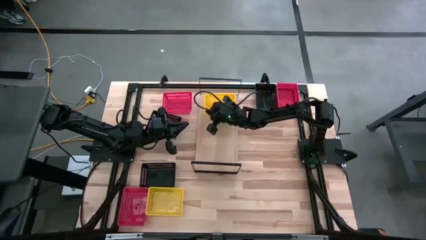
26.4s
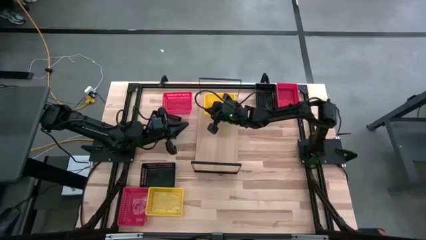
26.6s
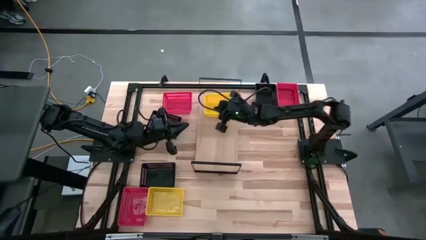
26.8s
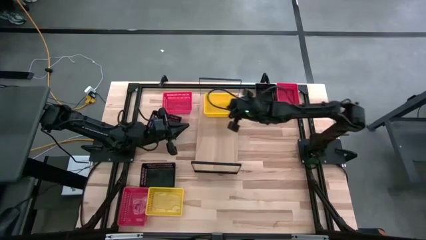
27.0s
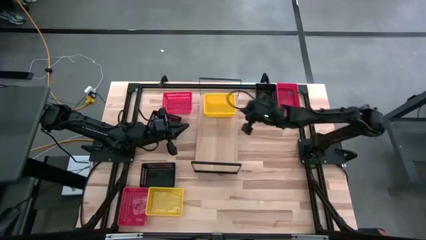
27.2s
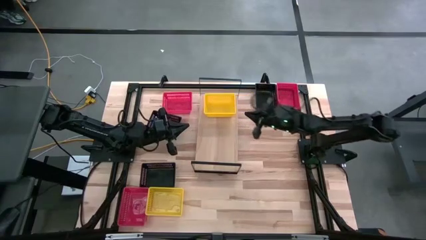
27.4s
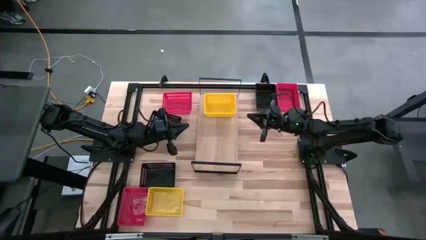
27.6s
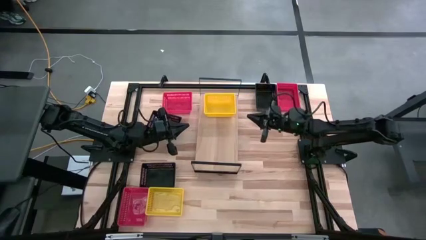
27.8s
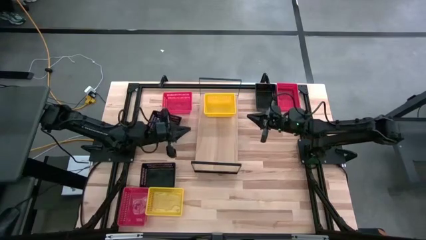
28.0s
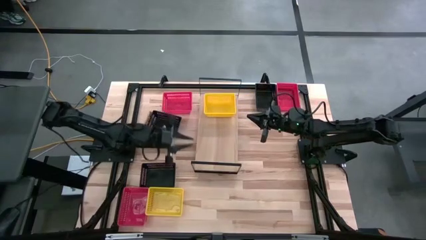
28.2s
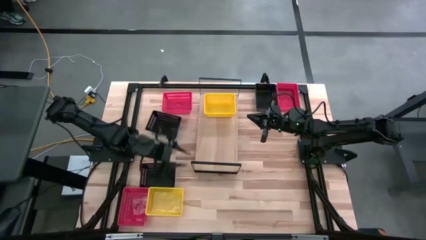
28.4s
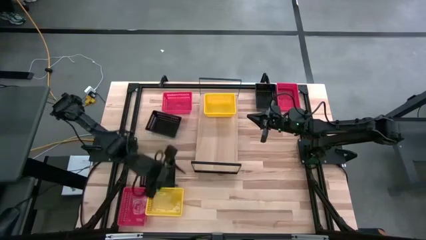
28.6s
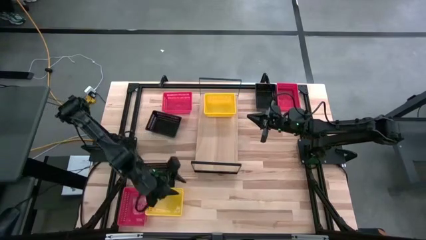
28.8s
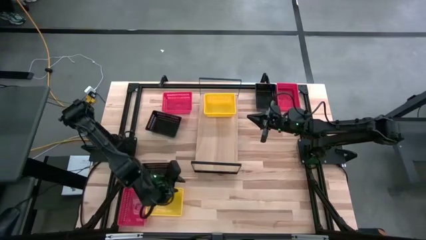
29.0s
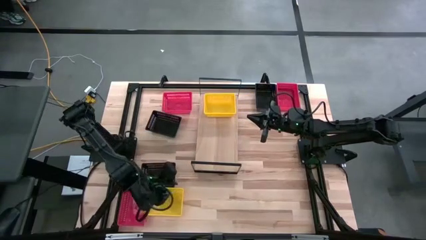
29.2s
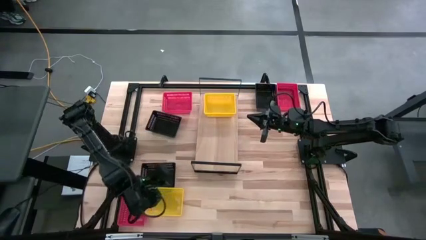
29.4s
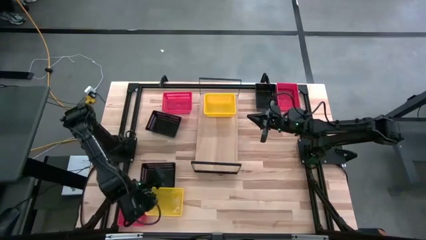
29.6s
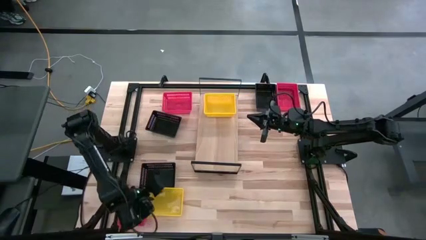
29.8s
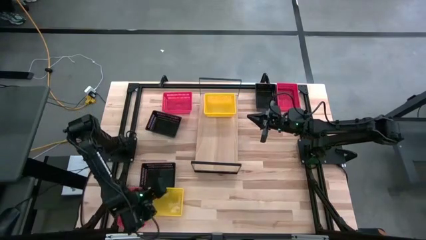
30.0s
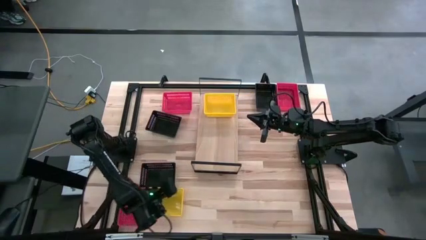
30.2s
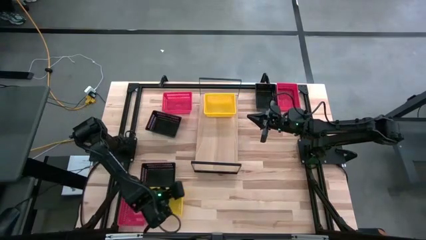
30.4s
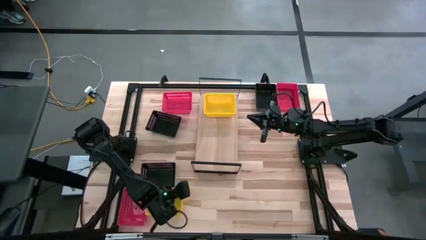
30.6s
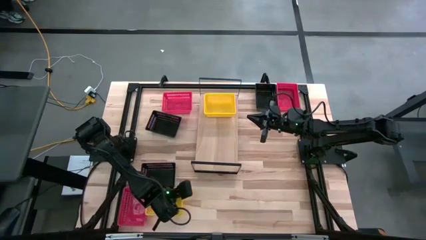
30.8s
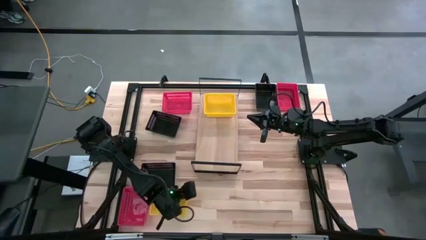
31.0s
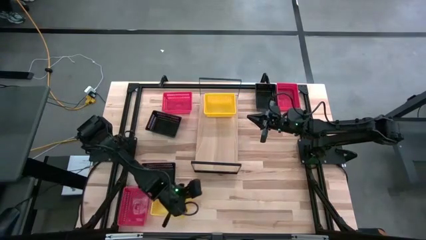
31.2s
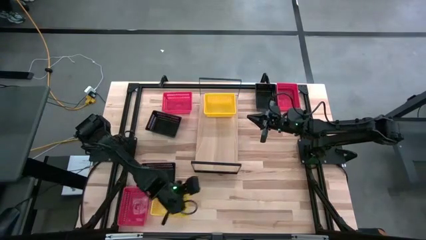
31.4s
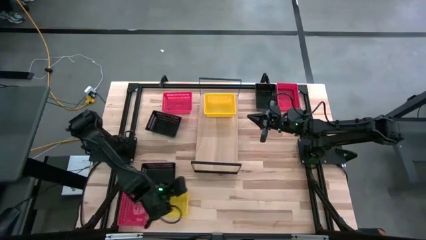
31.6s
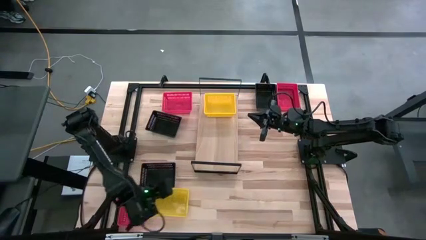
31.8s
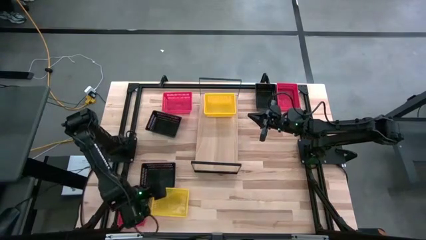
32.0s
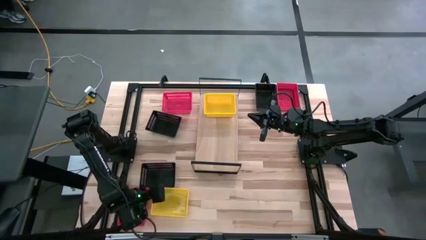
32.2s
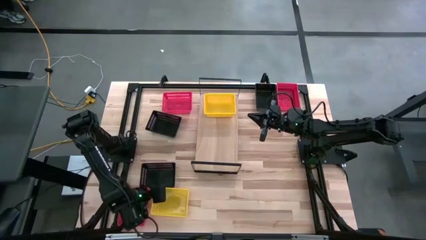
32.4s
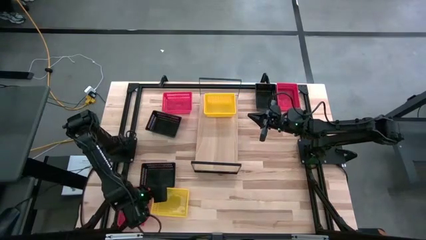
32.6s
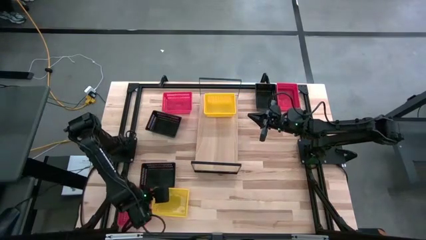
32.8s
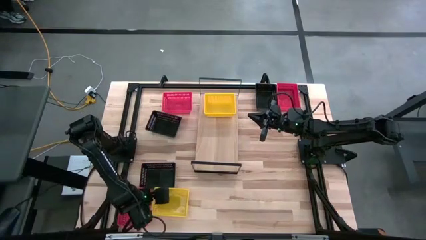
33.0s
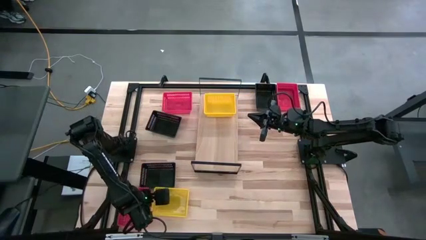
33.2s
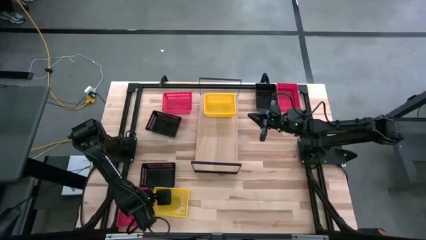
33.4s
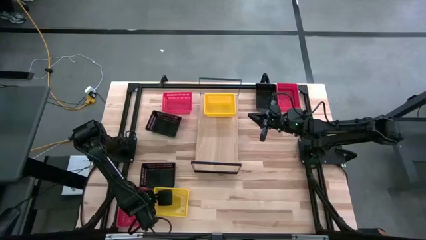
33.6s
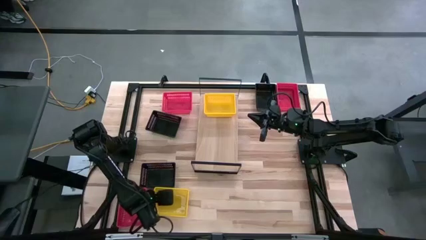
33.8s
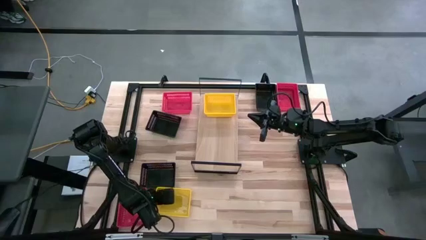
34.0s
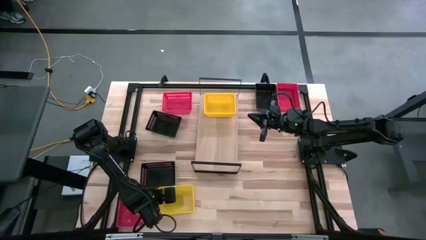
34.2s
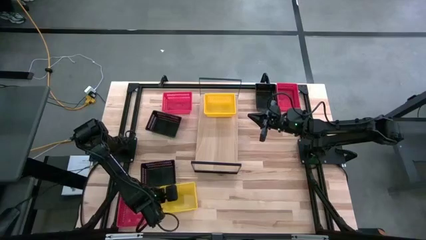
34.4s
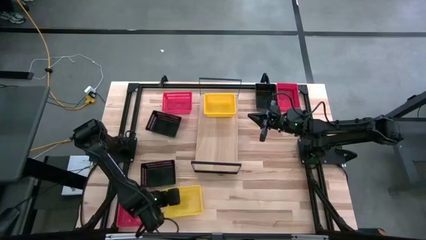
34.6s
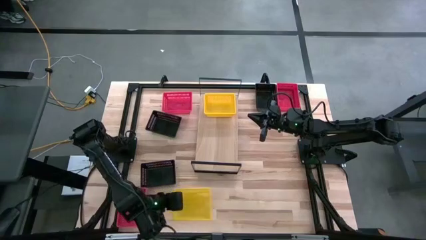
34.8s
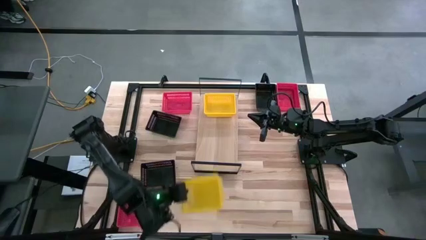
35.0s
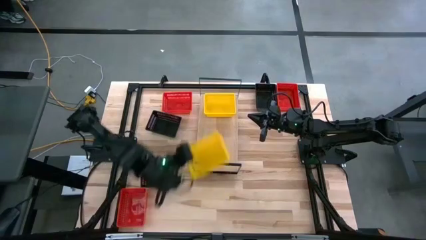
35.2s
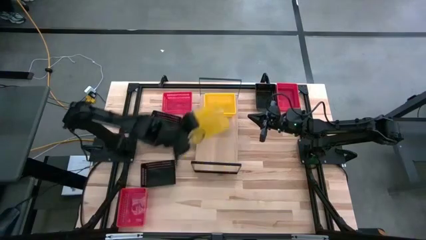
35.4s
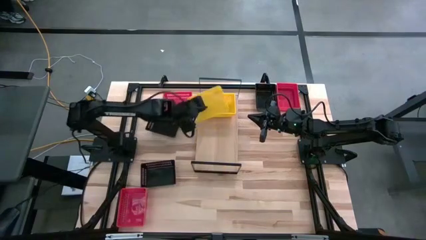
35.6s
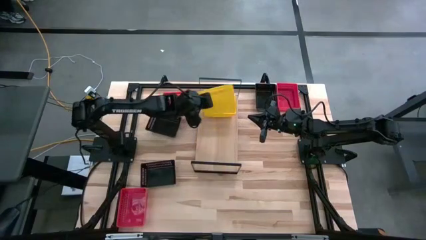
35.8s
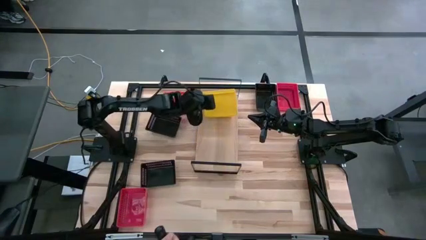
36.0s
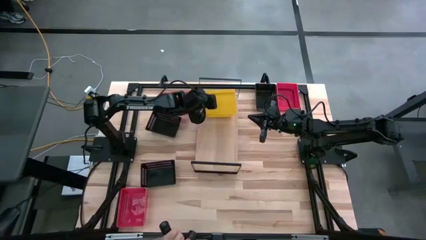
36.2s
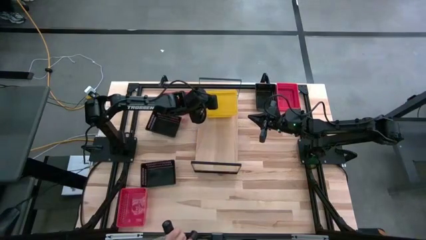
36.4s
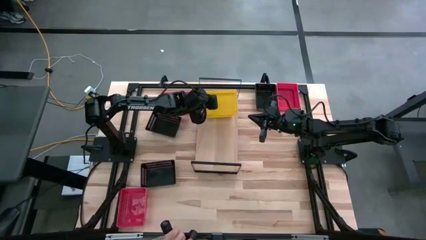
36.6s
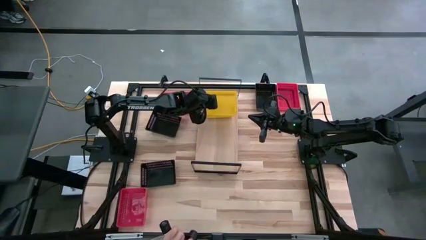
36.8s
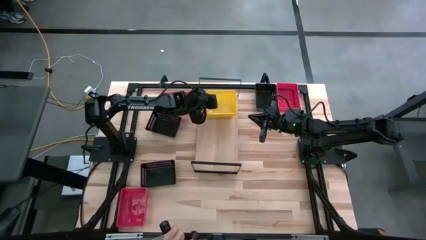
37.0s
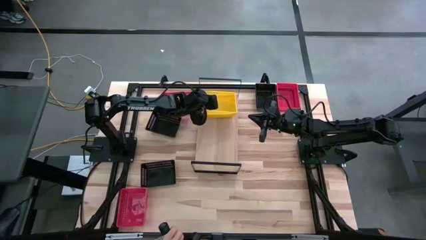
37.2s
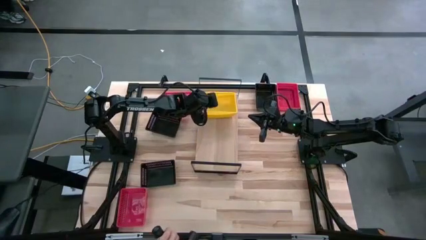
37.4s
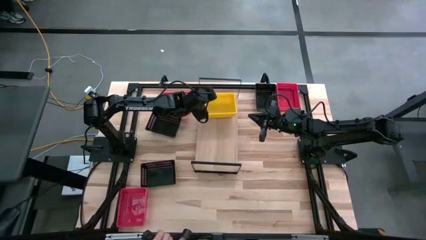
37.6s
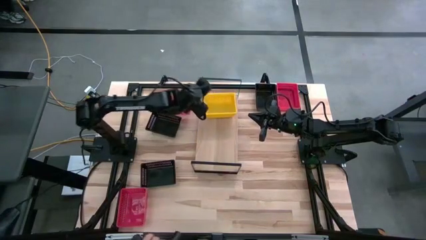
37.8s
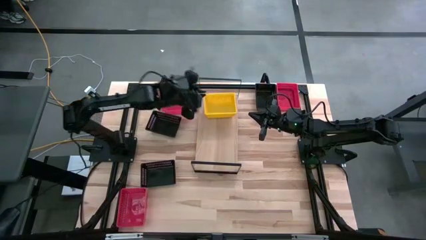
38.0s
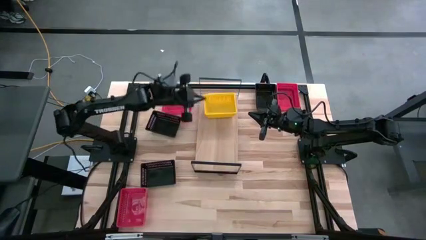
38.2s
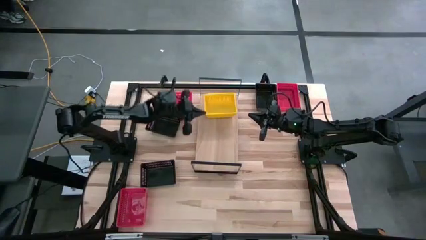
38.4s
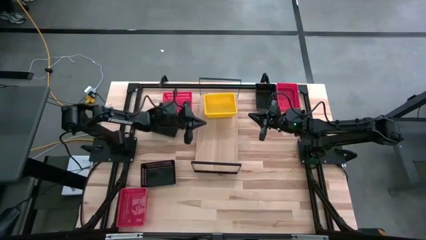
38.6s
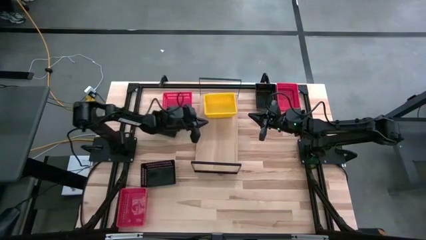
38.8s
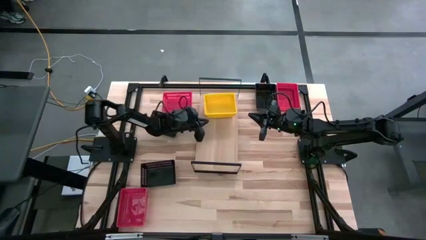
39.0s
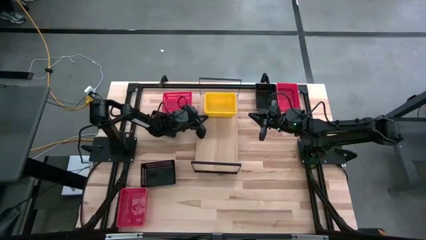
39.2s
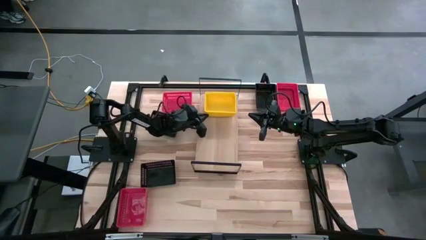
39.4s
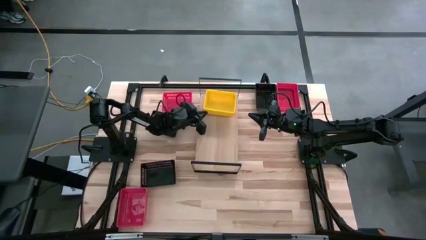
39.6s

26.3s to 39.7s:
Task: Stack baskets on shelf by color
Stack the yellow bin on the yellow bin on the shelf

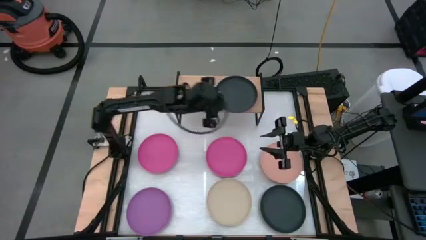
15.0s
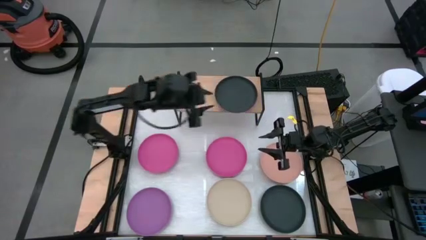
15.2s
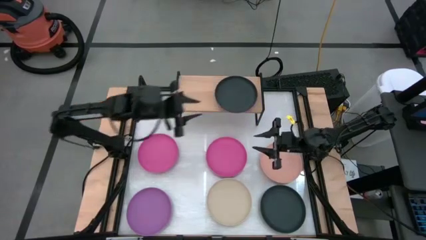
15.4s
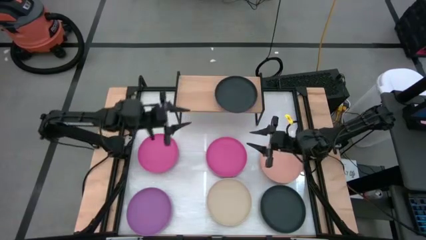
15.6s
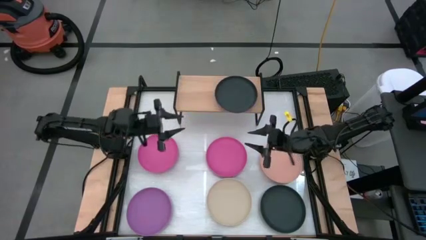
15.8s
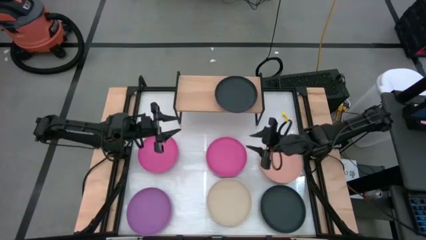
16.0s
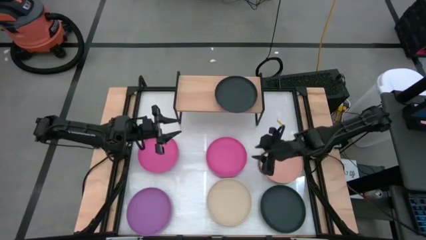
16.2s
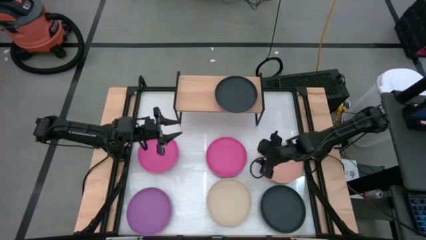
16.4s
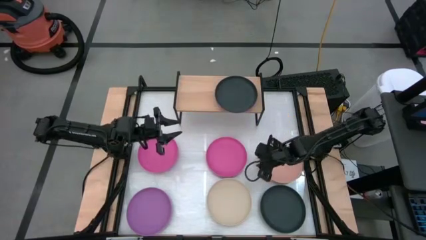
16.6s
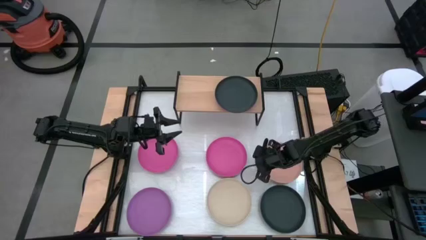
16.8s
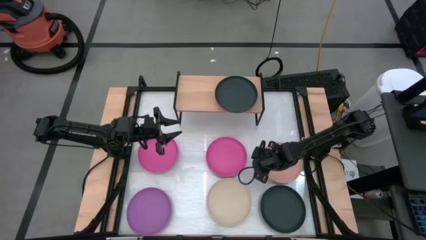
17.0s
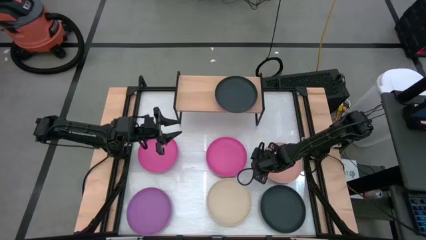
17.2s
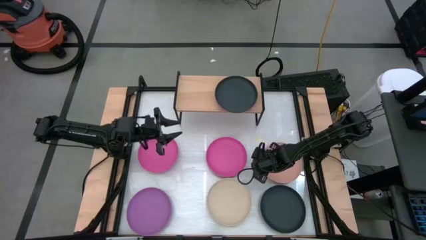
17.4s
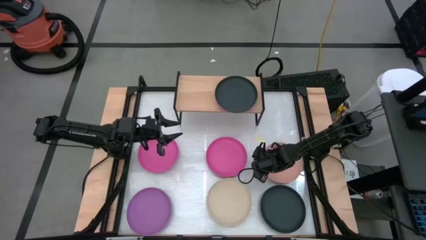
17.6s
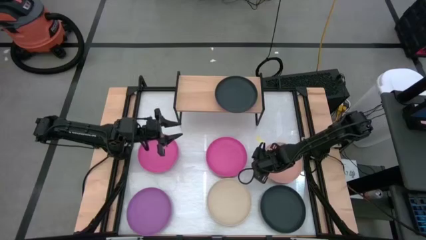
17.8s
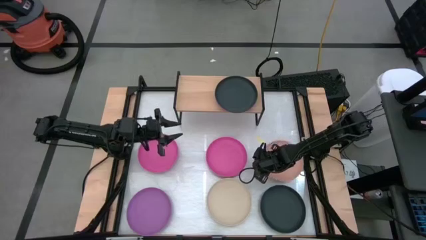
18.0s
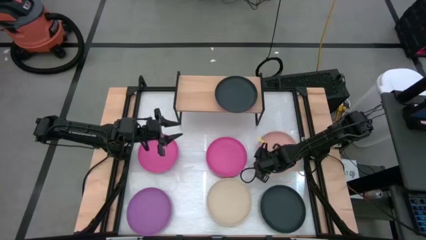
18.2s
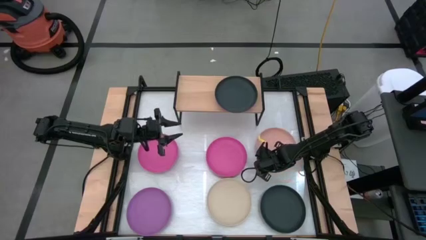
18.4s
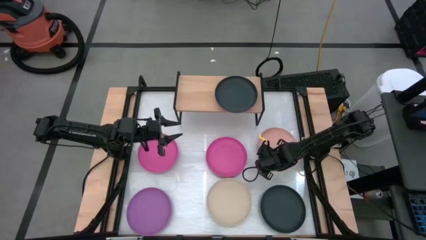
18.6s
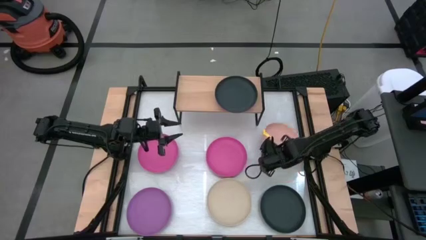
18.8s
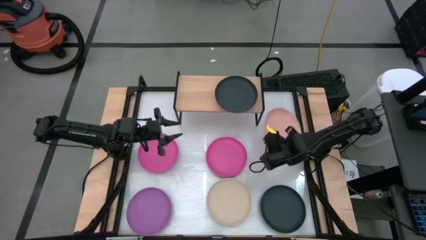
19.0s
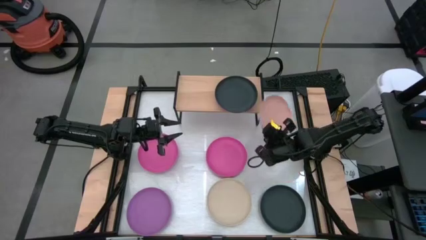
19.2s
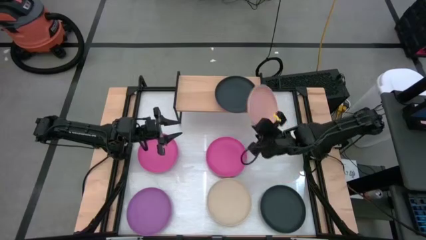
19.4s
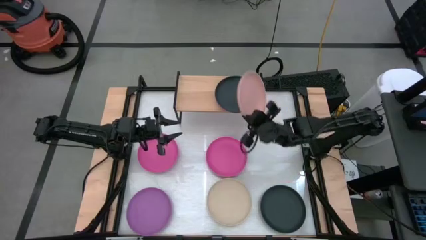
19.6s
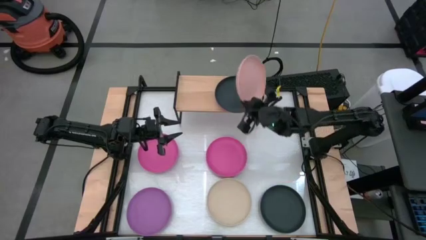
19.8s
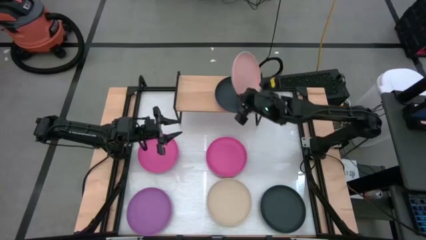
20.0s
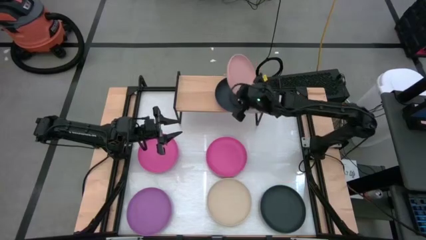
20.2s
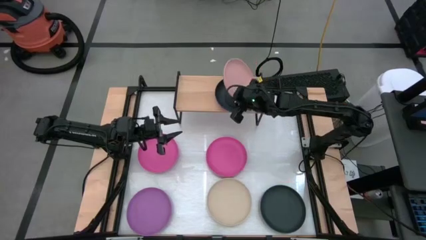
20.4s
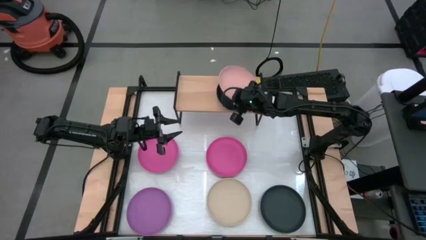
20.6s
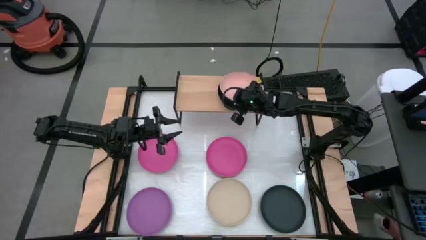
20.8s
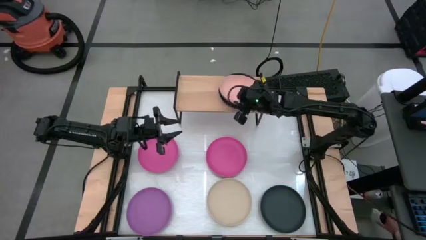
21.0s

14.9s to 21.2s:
Task: Place and stack plates onto a shelf
Stack the light orange plate on top of the black plate on the shelf
